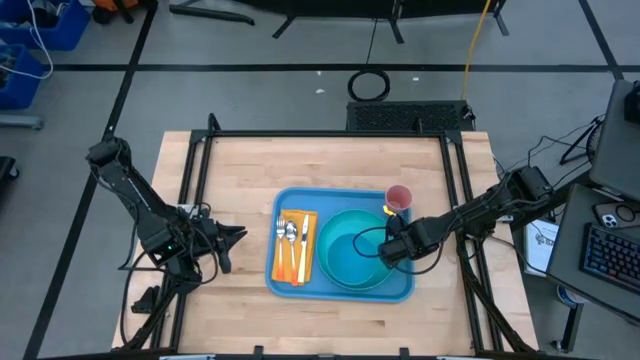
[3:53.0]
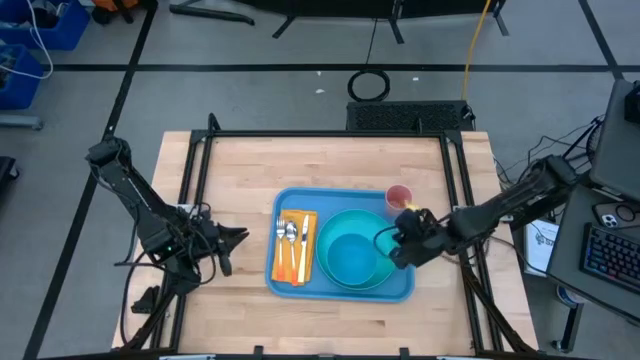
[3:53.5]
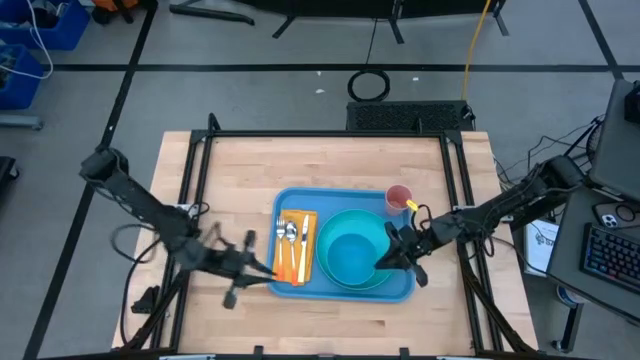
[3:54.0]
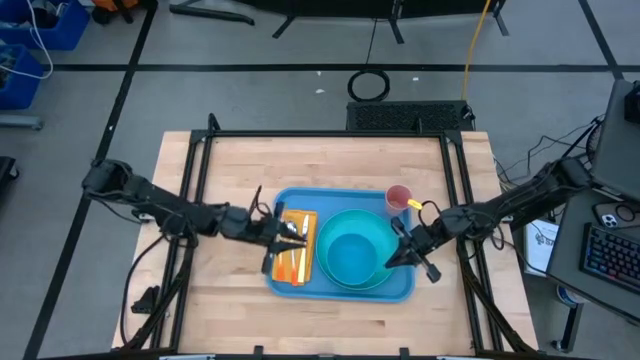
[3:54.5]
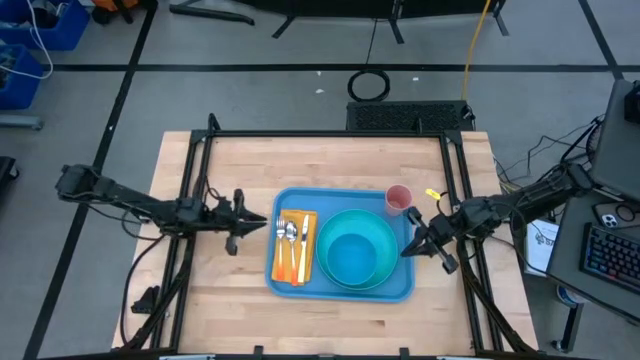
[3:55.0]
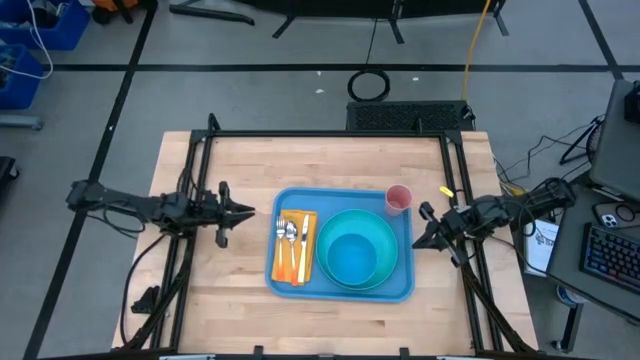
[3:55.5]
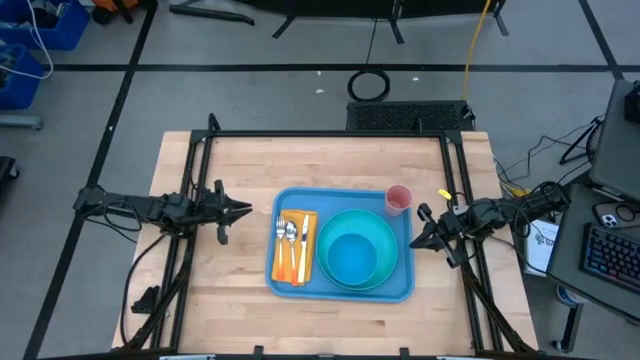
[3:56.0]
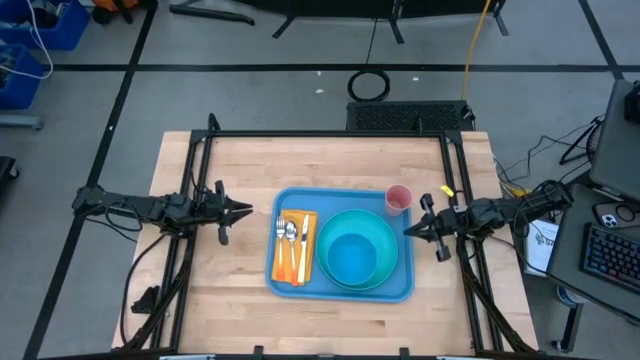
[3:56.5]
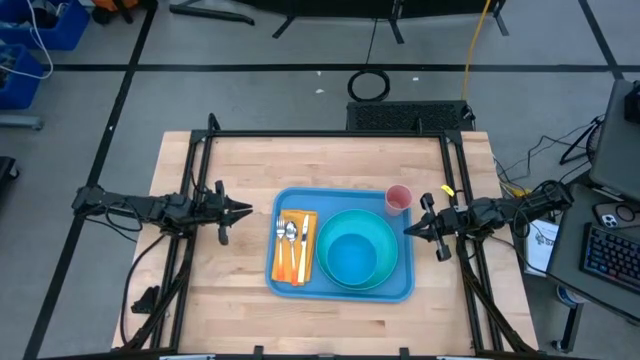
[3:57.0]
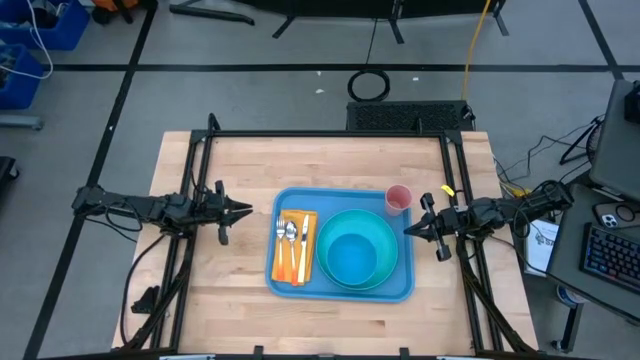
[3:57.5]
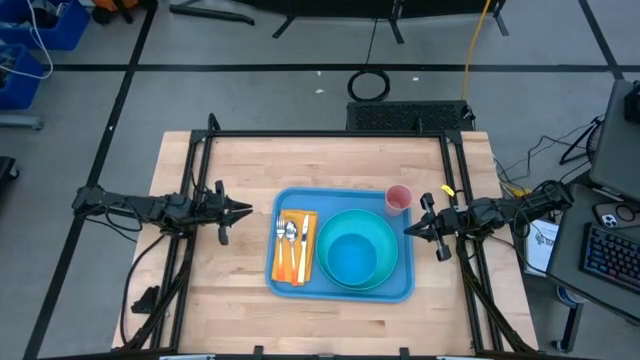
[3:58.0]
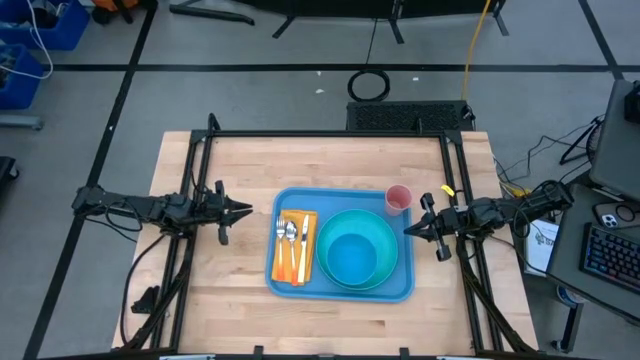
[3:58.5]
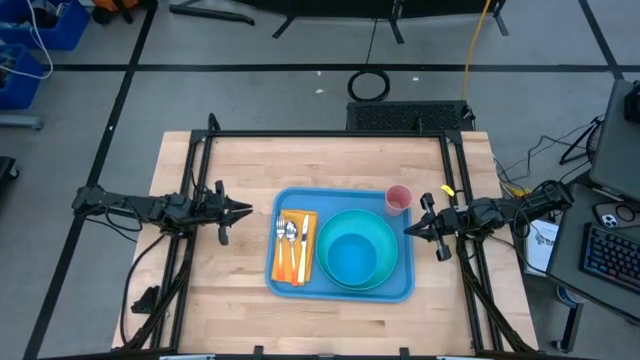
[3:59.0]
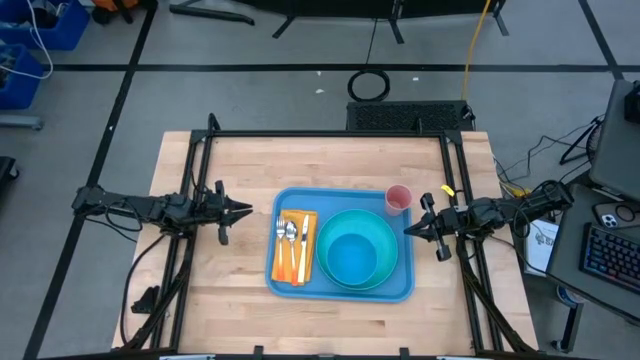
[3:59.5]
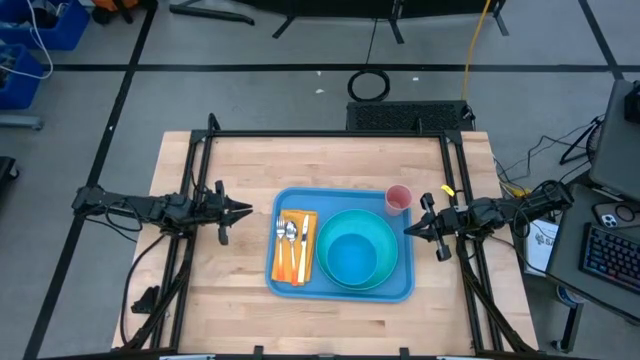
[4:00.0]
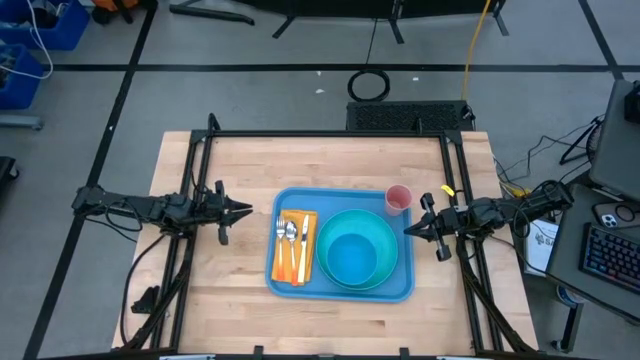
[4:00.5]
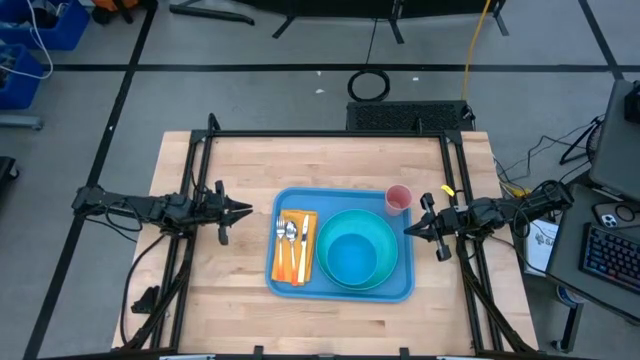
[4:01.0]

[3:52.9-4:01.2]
Task: Set up tray
Return to Home Position

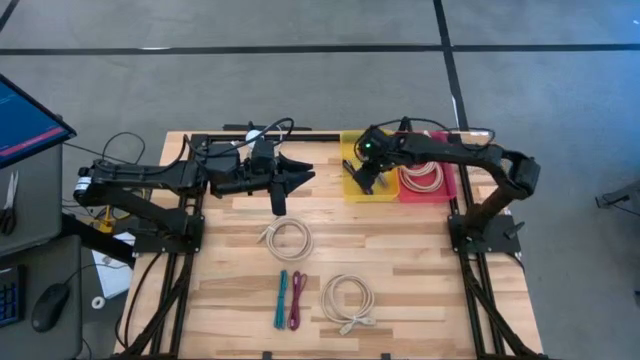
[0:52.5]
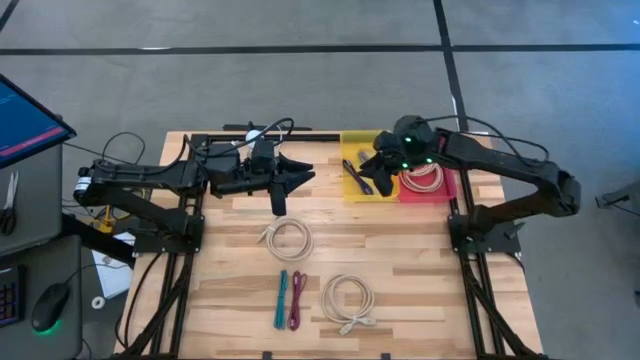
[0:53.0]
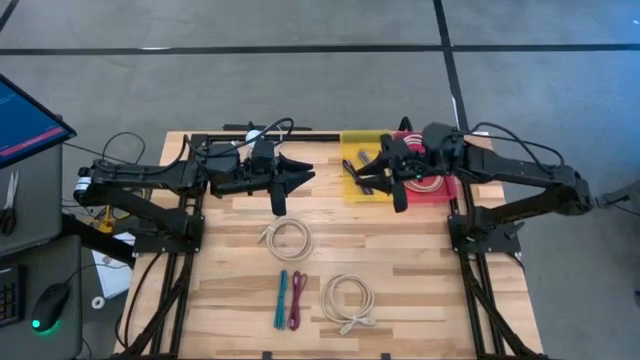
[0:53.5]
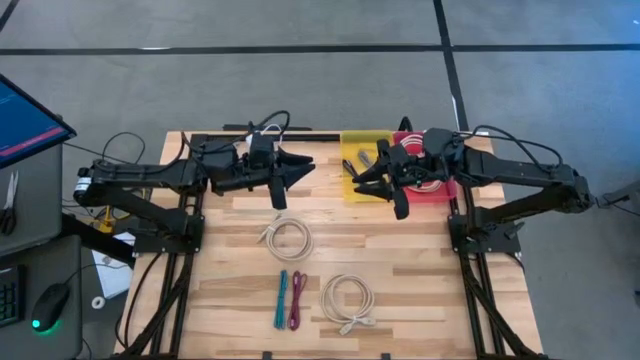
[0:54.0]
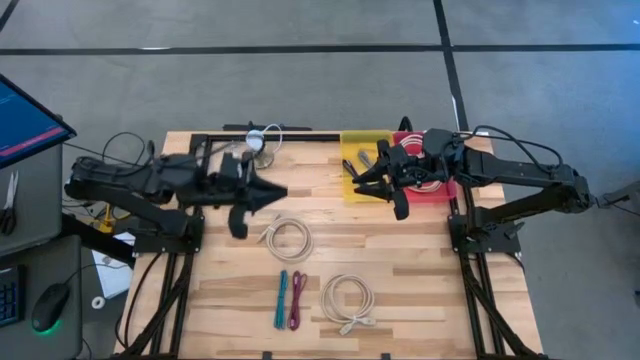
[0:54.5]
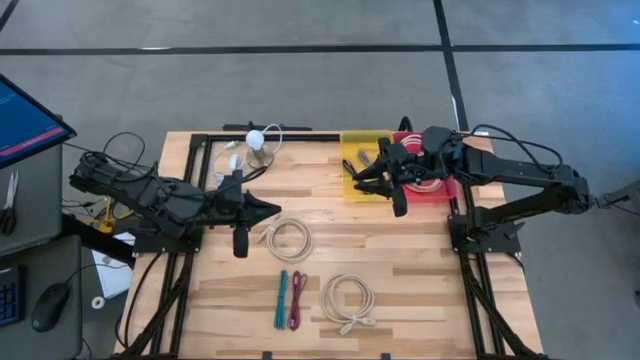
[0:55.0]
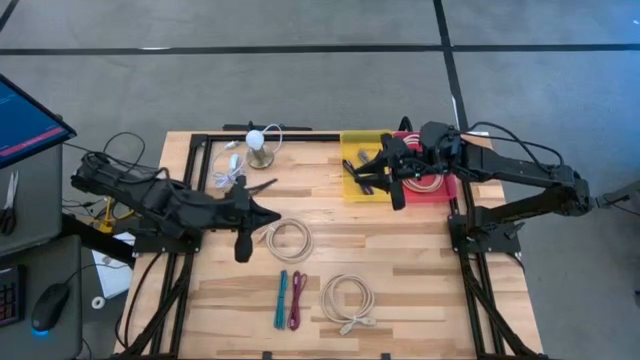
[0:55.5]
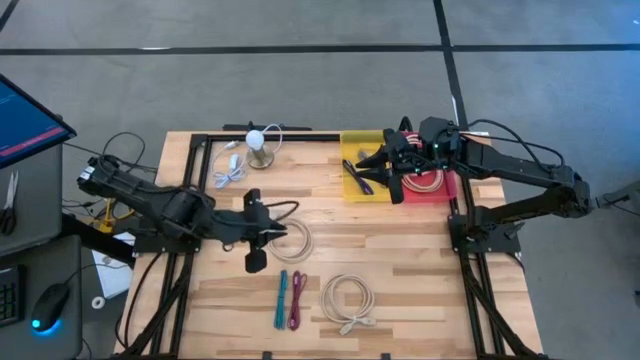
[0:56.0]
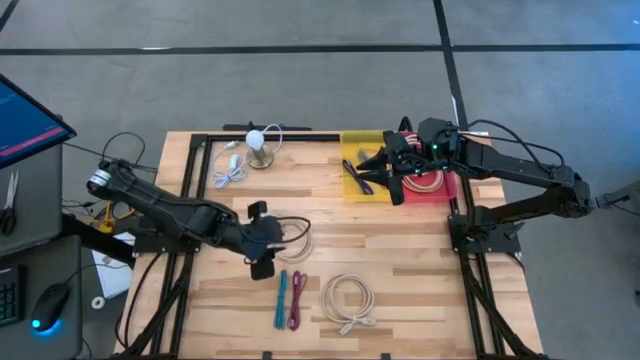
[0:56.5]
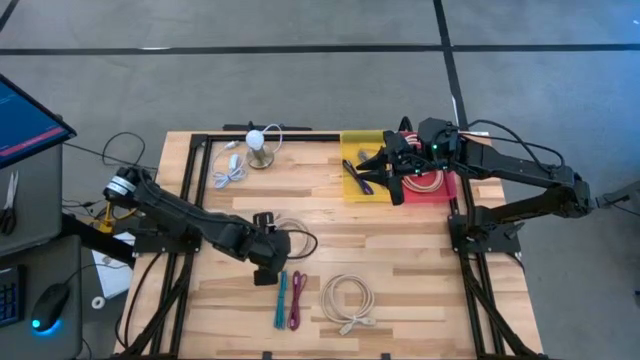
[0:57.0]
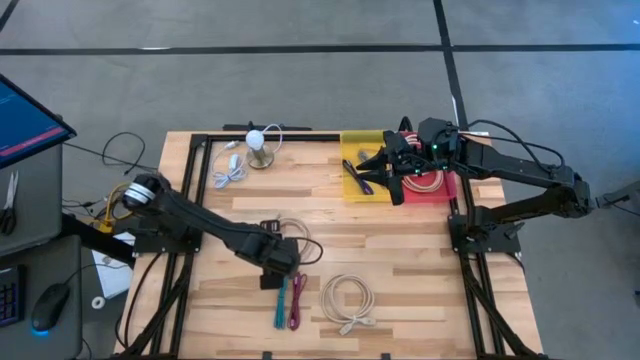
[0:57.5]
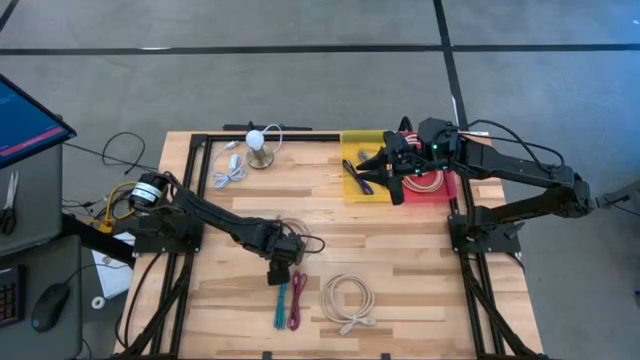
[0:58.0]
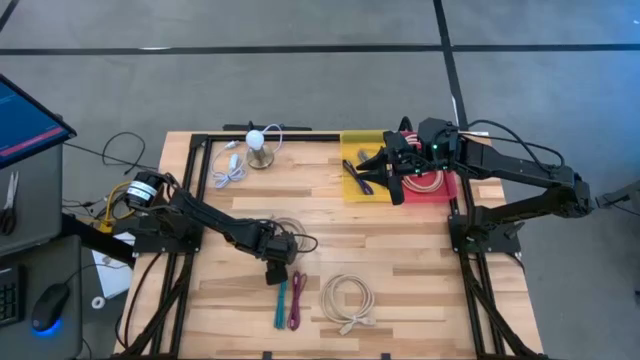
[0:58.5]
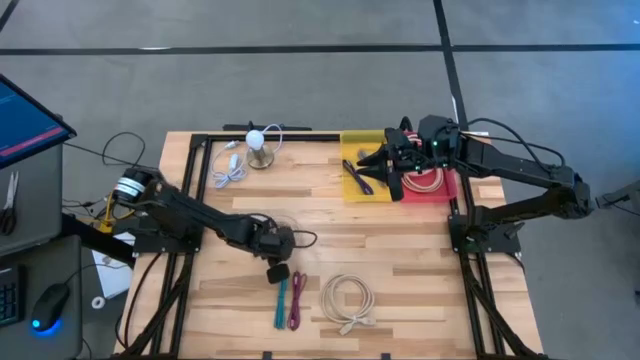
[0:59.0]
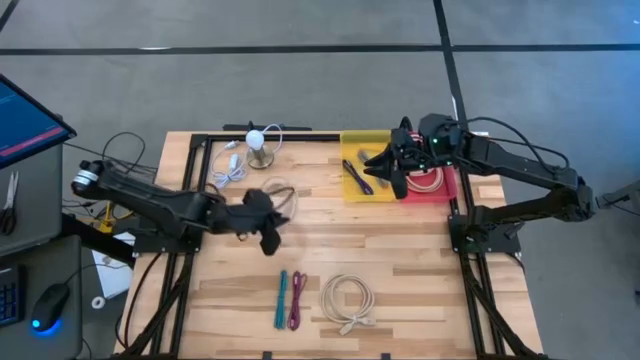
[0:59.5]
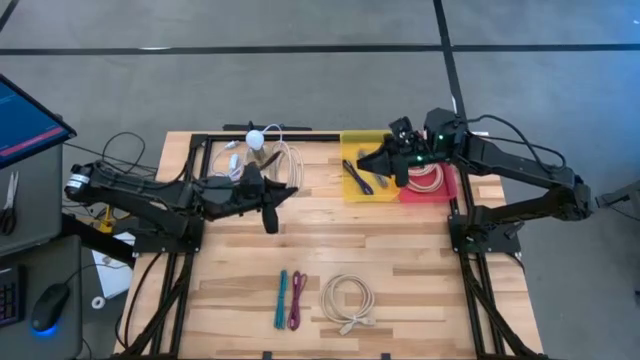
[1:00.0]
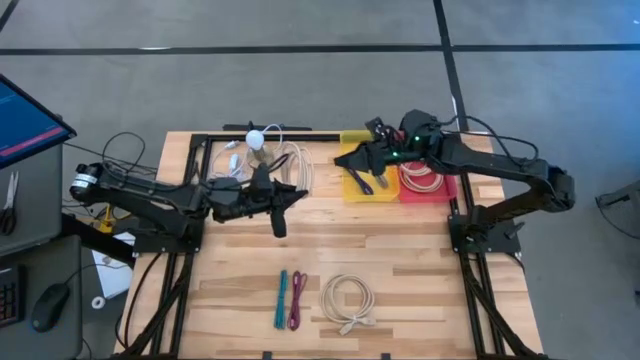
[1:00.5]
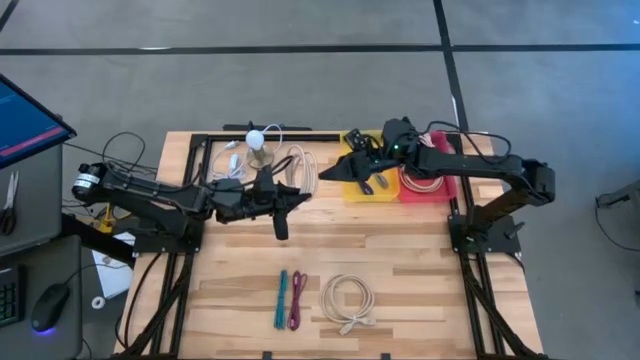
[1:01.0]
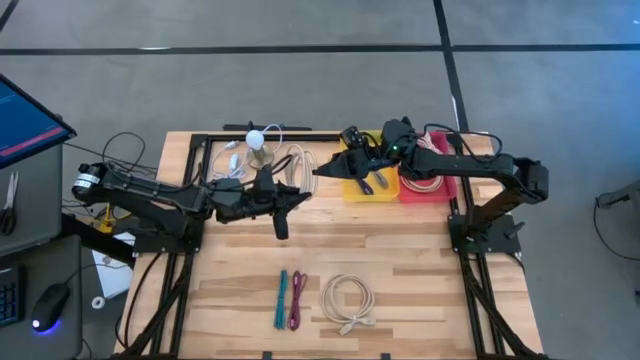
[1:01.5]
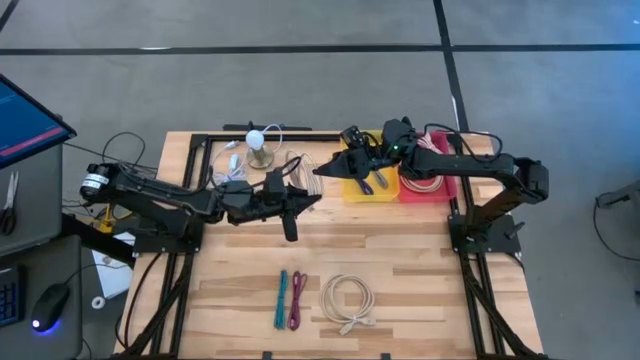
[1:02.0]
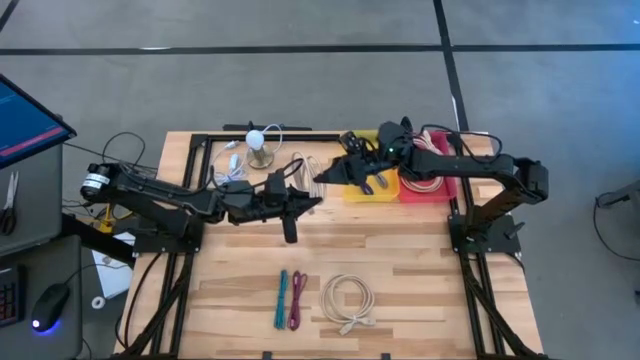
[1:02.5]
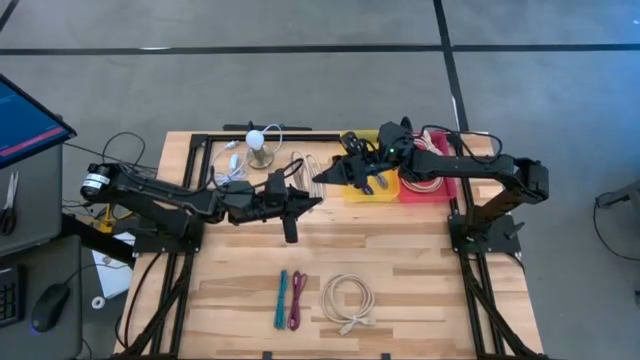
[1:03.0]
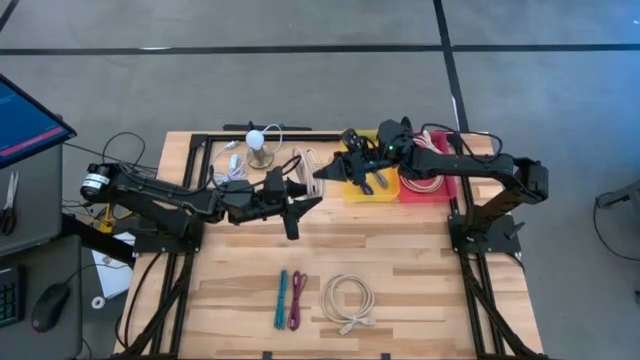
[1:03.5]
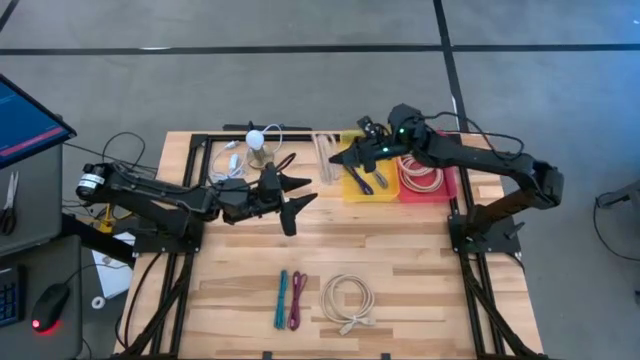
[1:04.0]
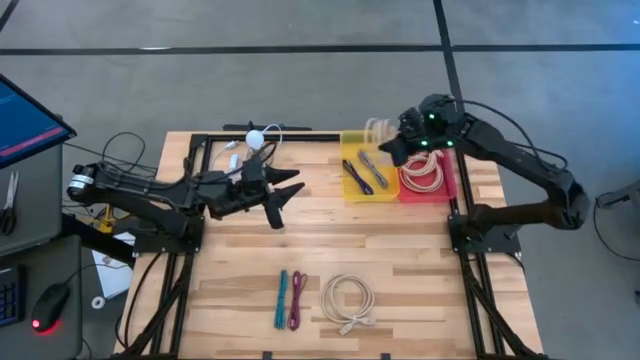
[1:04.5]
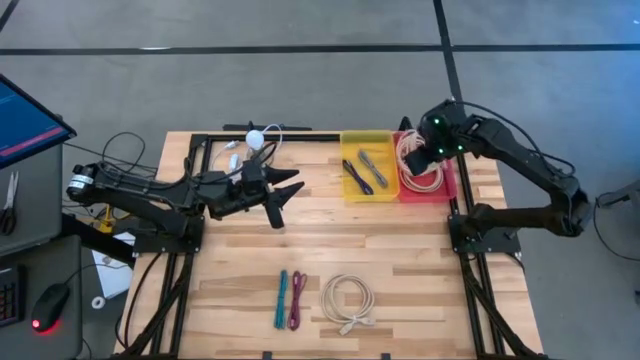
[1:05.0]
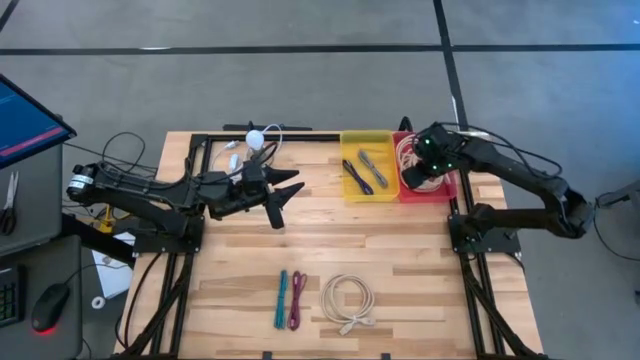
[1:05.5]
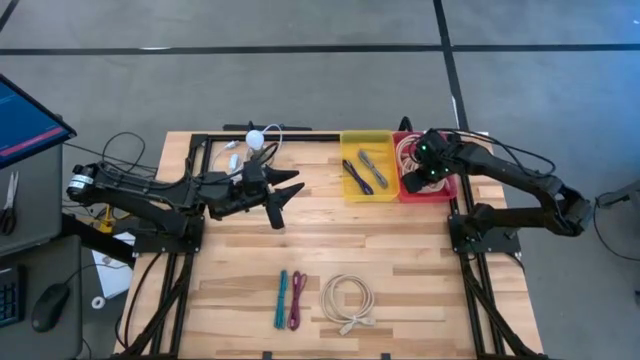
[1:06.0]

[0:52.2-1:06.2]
Task: Pick & Place USB Port
Put the white HDMI cable into the red bin
